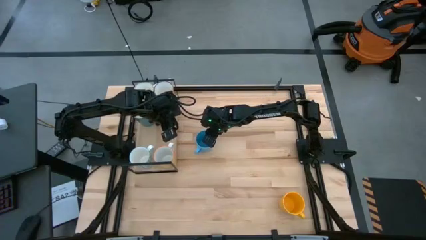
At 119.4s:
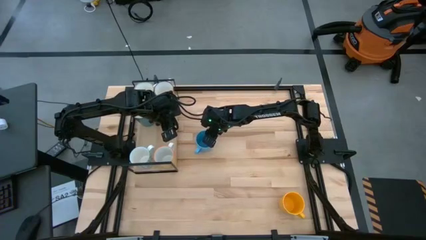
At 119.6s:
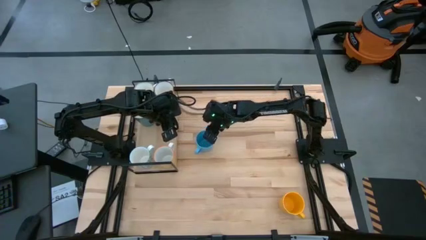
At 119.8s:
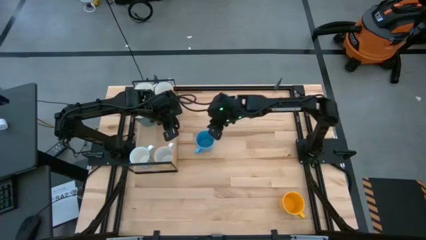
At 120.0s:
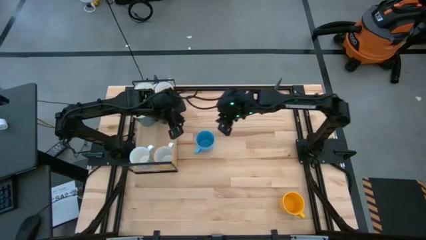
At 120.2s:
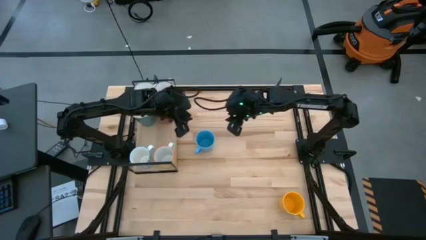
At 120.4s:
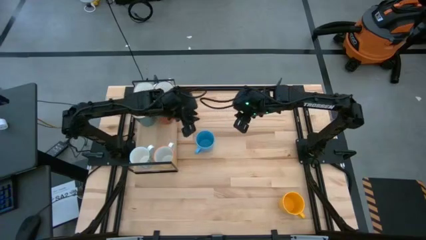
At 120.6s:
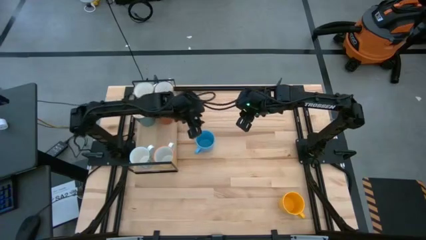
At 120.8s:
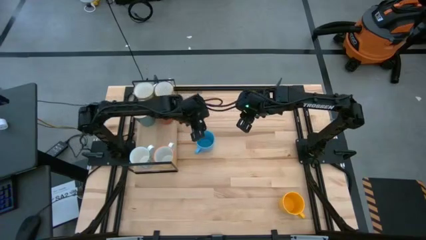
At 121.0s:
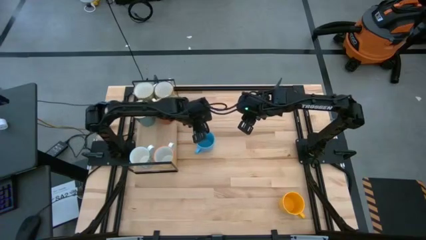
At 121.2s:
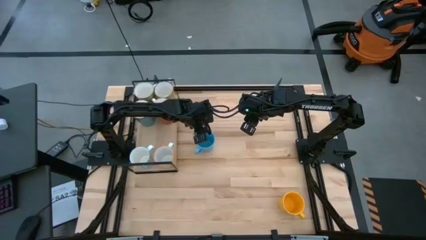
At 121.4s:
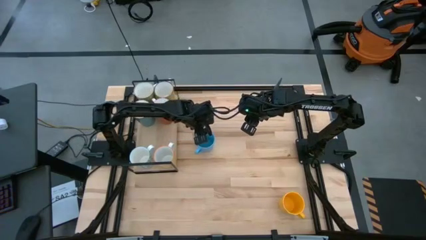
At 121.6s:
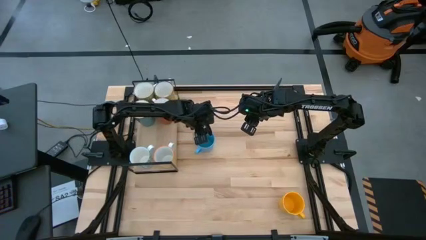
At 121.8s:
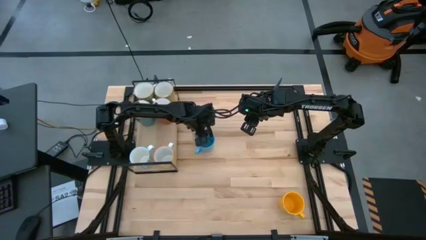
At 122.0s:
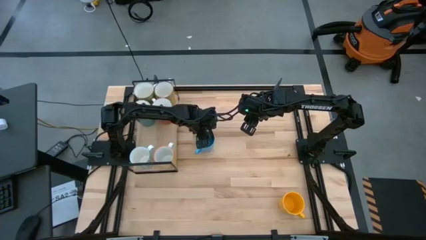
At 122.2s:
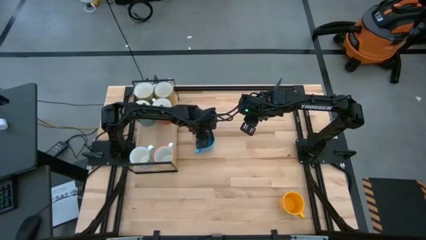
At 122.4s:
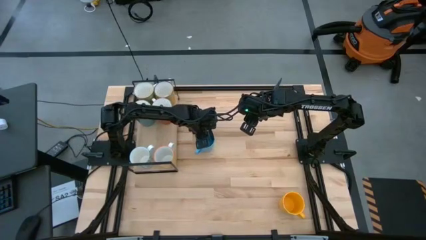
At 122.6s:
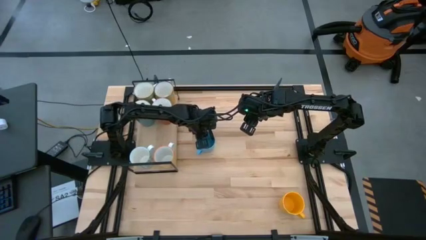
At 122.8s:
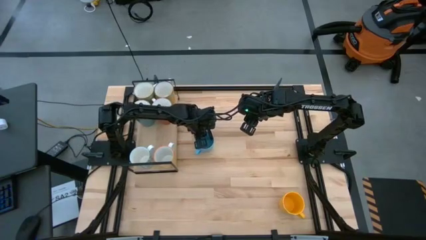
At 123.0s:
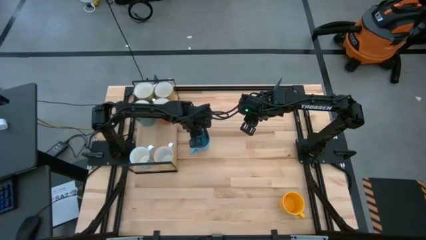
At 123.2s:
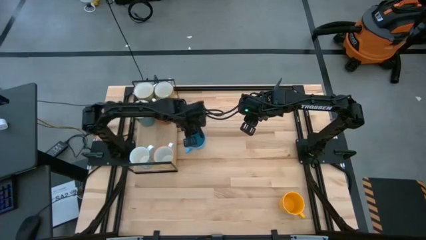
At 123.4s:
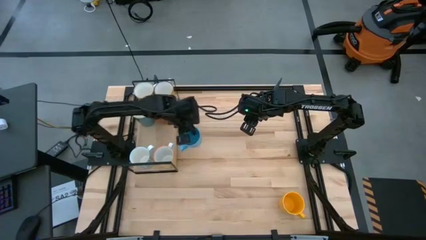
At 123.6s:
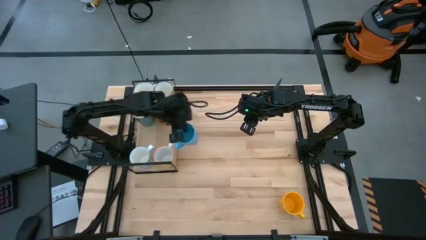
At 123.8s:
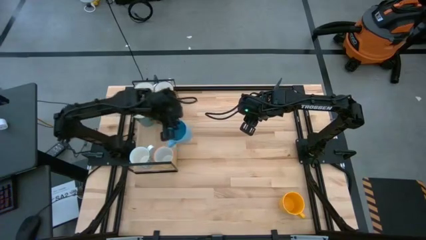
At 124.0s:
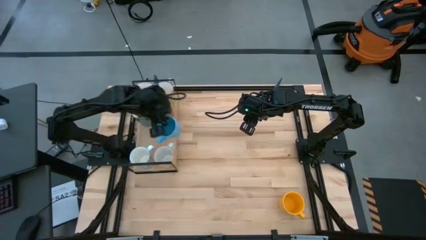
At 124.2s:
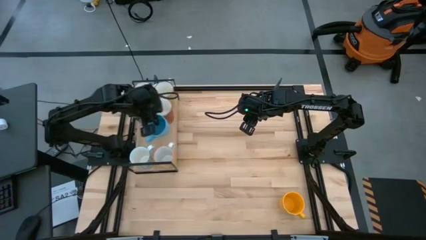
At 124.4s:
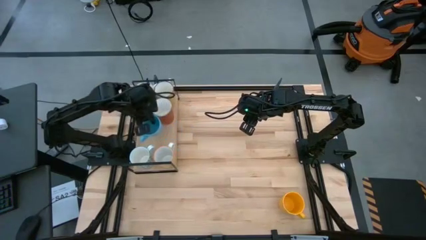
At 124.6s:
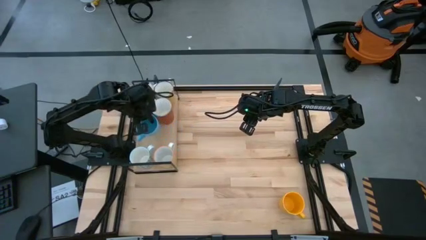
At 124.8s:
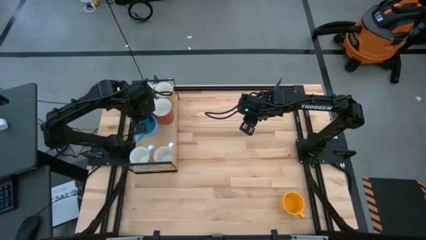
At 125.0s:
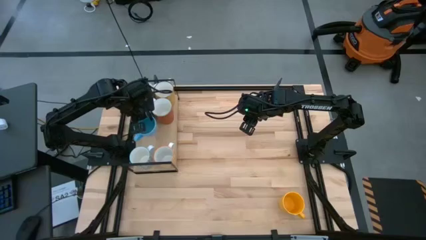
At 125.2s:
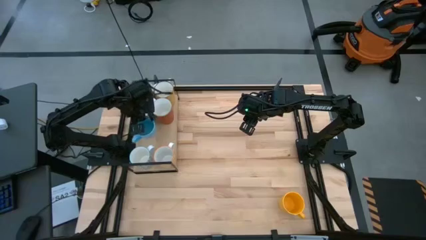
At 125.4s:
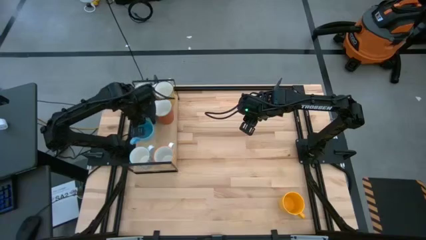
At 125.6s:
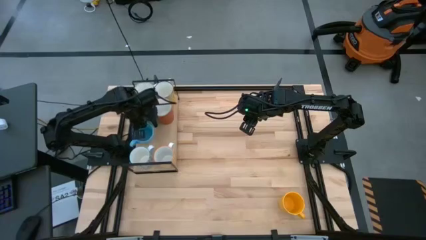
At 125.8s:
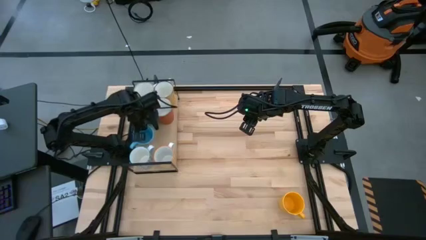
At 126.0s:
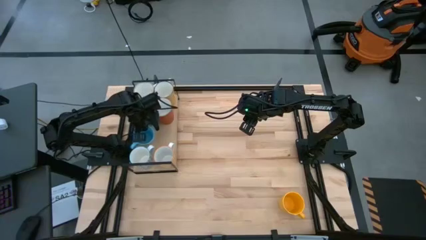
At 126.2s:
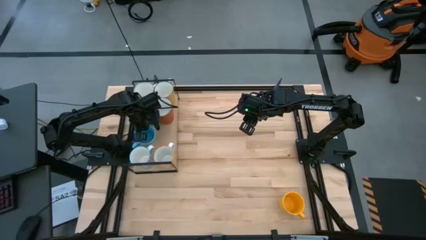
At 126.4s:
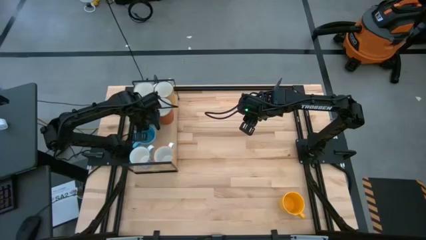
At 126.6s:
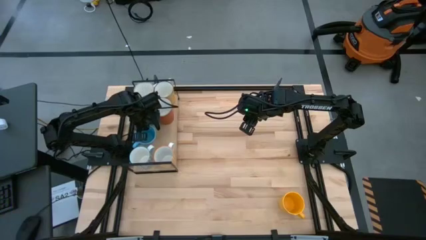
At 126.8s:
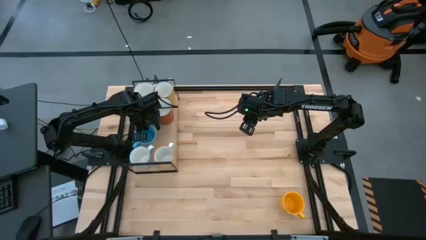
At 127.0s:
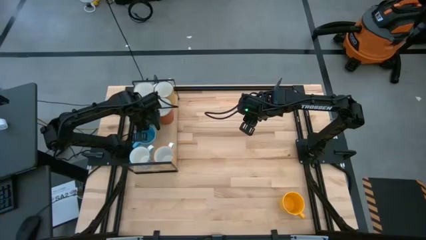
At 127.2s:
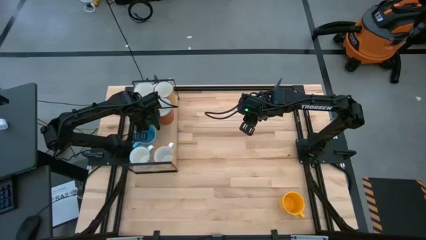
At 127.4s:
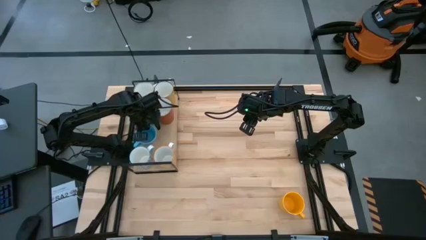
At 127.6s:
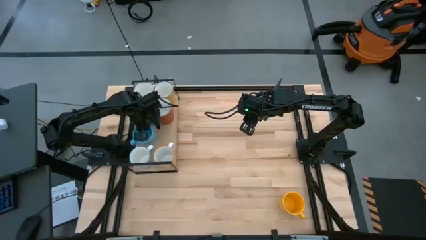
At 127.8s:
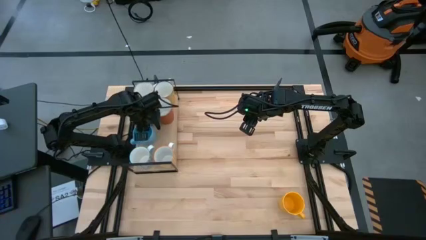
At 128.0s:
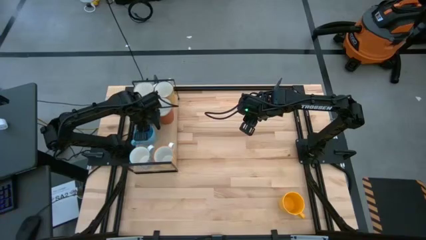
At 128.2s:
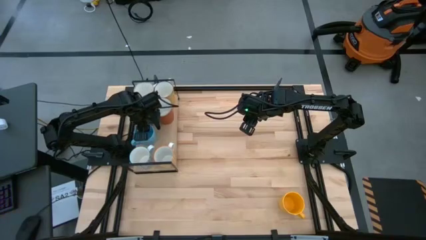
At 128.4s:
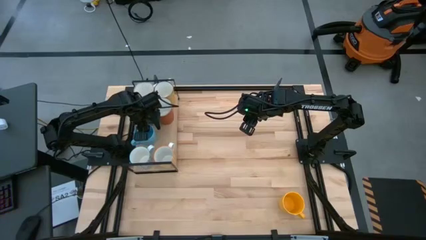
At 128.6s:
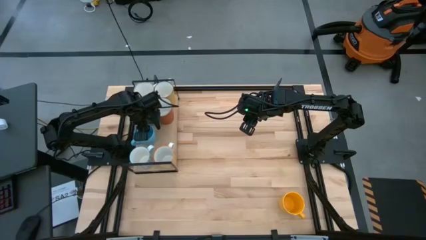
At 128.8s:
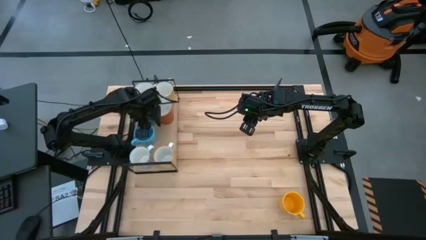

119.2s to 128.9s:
Task: Place coffee mugs
Put the blue mug on the shelf

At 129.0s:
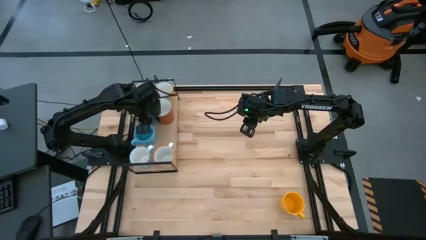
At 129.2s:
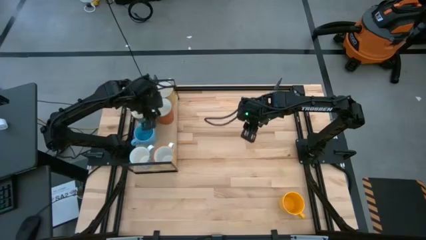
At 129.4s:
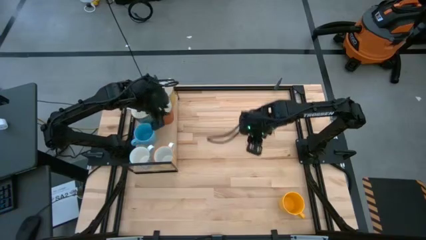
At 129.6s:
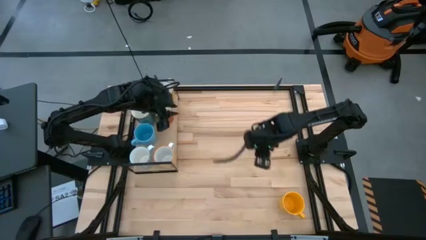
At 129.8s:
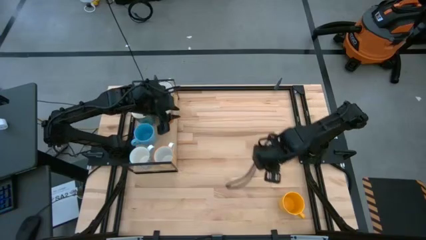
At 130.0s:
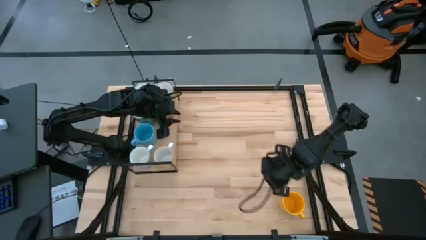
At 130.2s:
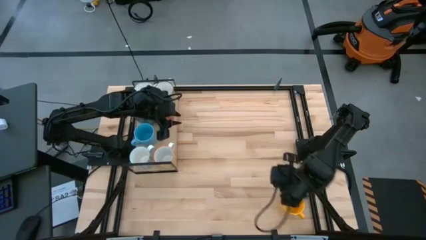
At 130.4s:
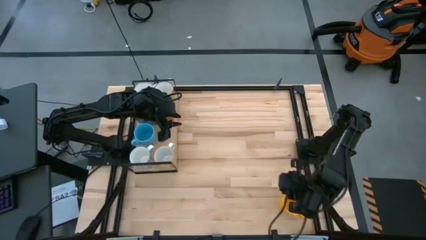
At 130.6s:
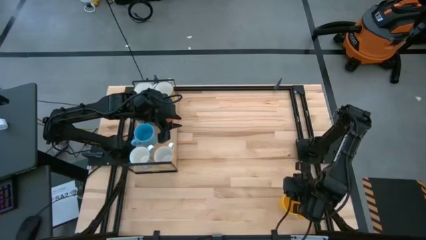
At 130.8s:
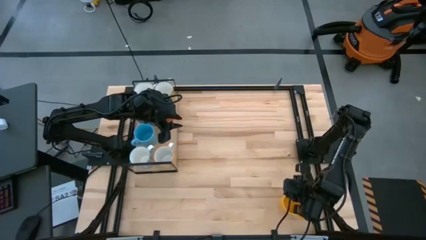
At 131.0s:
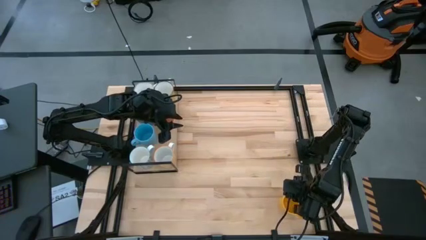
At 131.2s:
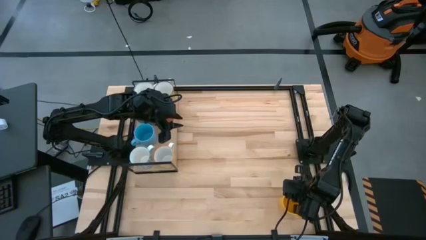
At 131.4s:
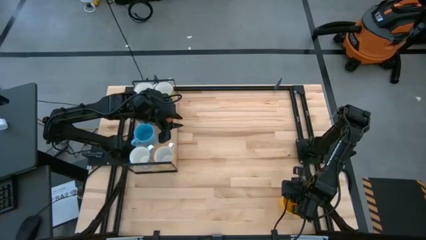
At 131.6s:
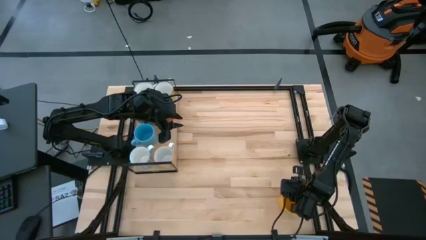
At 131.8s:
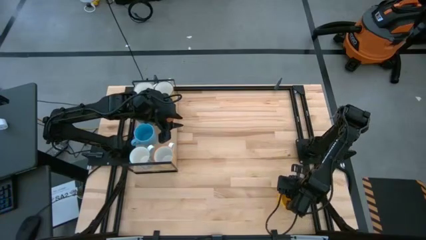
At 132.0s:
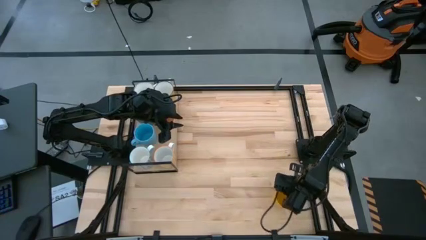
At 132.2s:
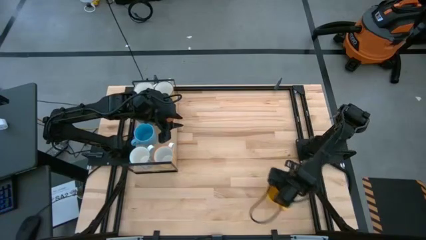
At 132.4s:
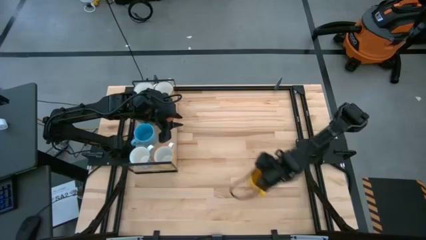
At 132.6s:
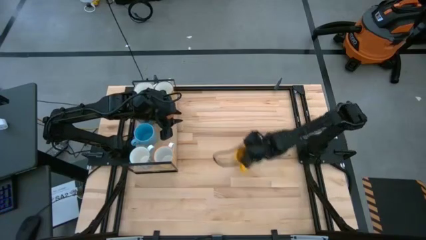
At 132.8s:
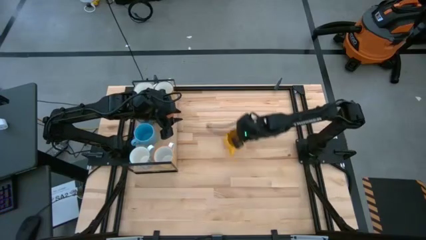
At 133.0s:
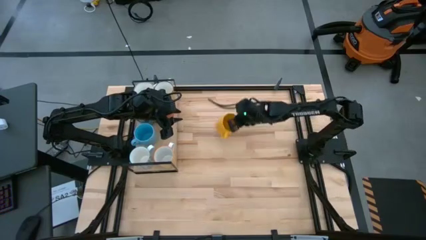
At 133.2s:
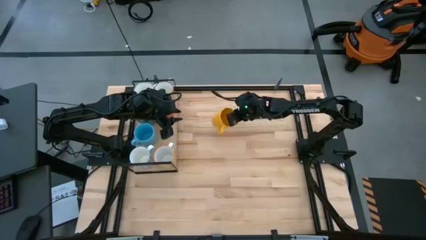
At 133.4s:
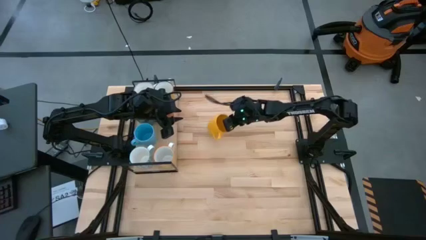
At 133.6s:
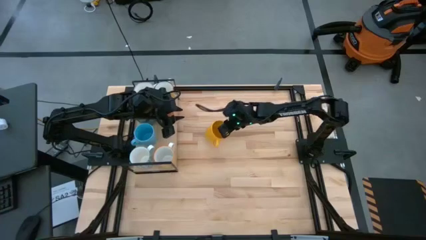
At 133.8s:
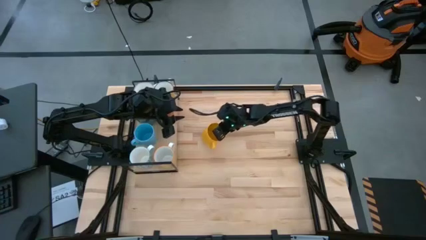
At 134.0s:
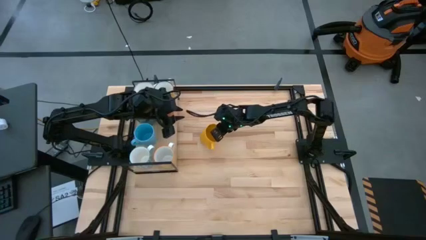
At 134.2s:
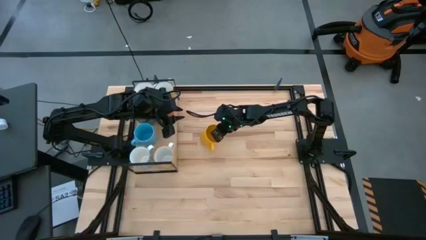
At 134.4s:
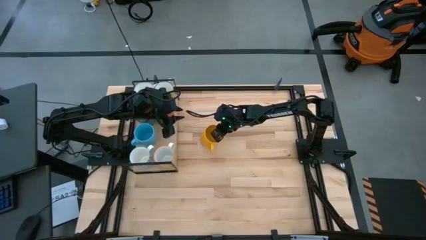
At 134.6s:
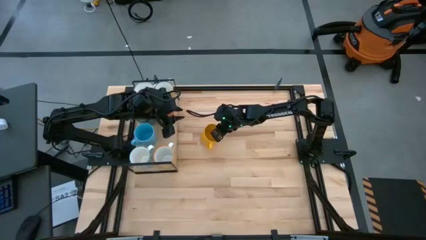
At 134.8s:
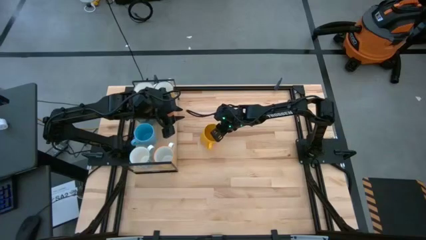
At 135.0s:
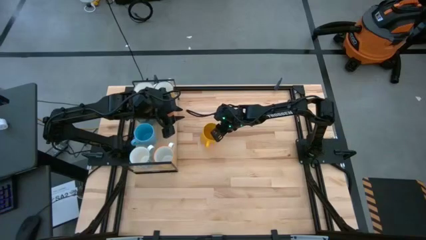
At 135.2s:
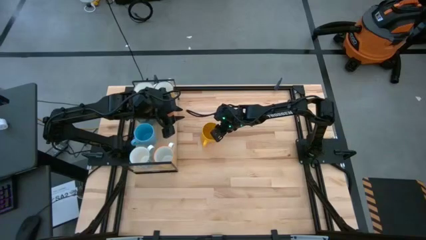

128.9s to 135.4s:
Move the yellow mug to the top center

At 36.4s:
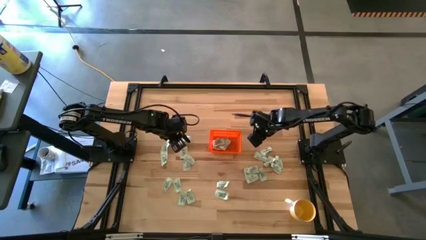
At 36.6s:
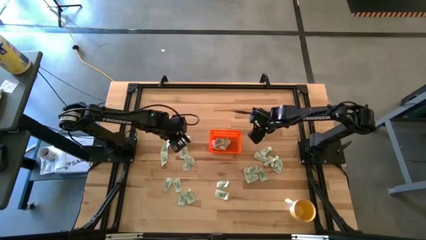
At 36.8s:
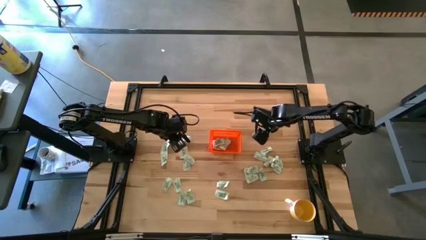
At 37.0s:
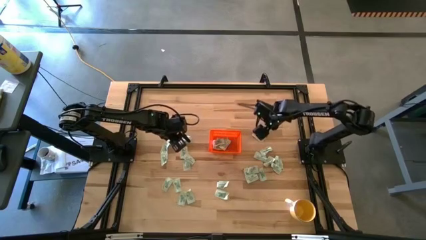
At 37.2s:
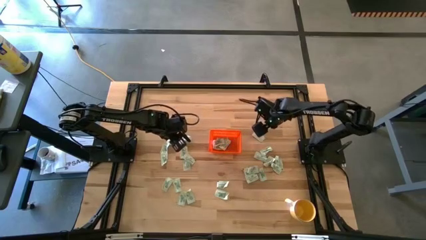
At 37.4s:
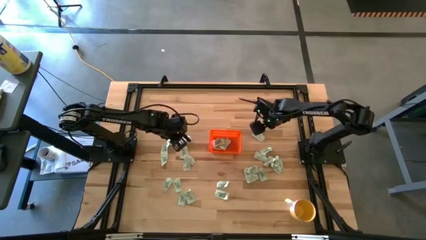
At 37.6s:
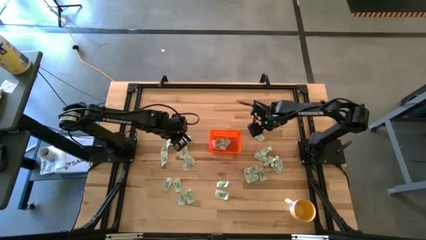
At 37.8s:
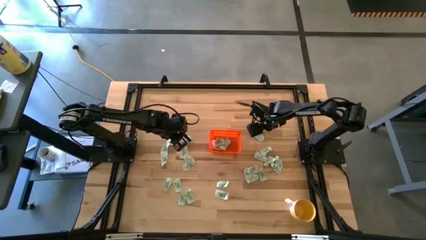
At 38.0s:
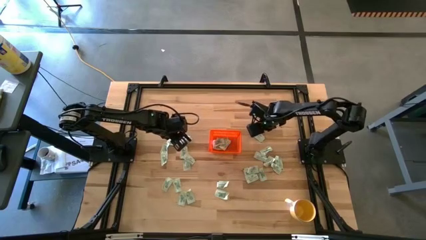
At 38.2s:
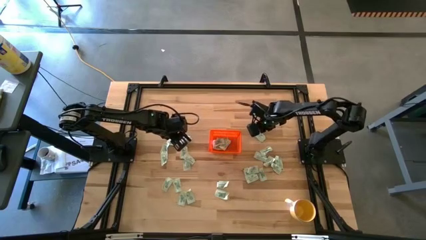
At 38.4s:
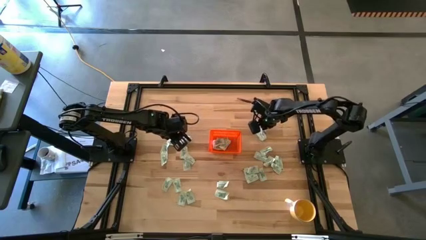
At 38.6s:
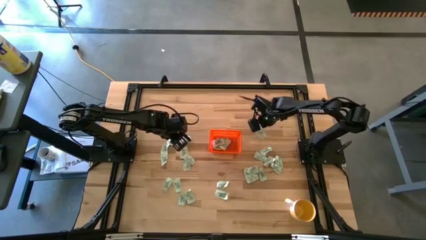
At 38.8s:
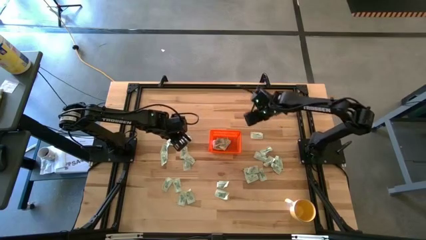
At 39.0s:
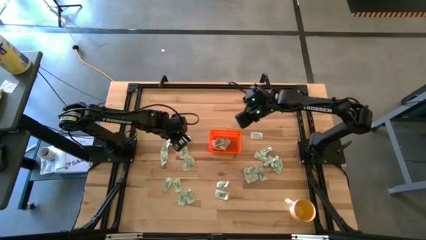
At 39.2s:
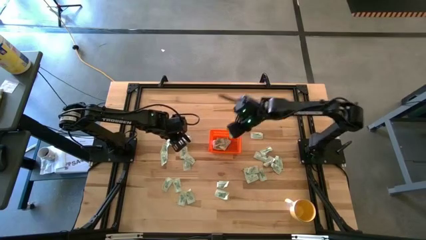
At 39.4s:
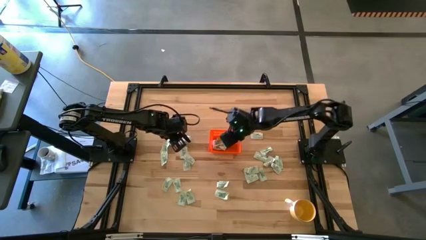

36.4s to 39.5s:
Task: Pick and place Stevia / Truvia into bins
Put the light green stevia packet into the orange basket
